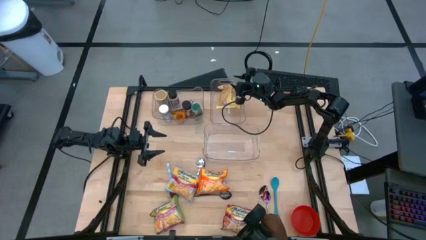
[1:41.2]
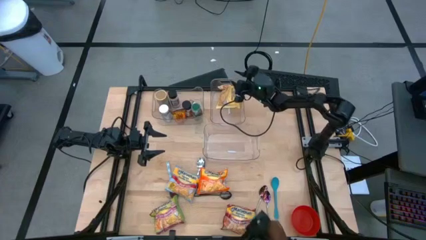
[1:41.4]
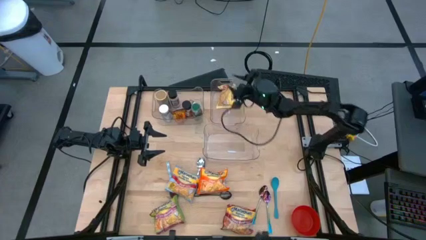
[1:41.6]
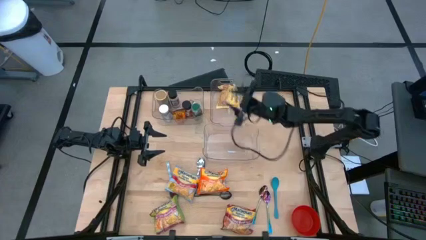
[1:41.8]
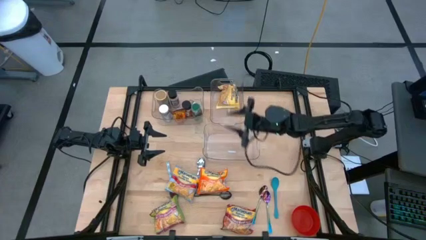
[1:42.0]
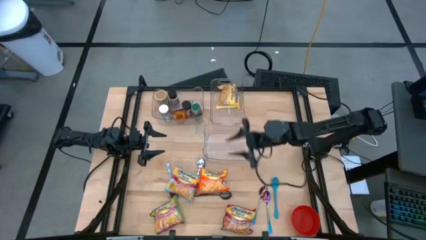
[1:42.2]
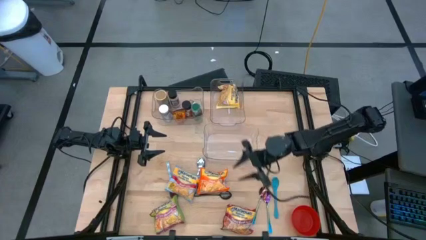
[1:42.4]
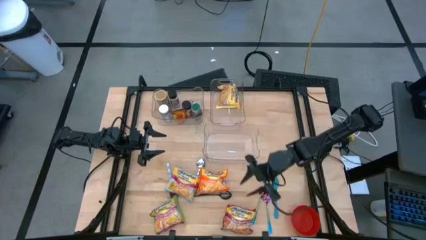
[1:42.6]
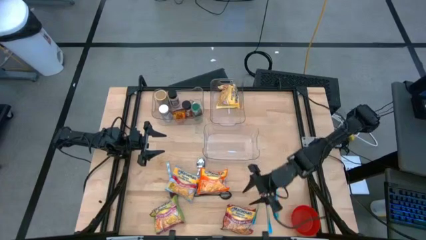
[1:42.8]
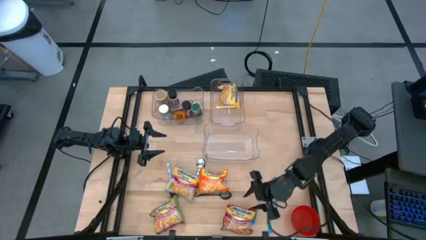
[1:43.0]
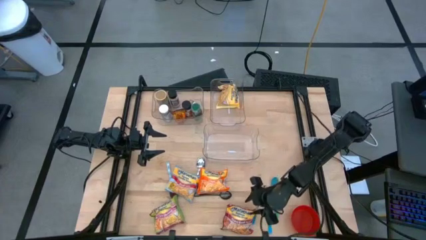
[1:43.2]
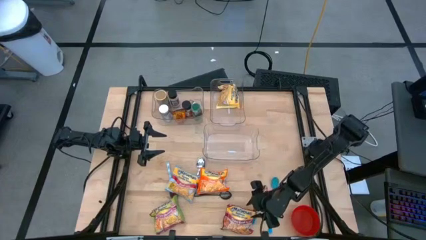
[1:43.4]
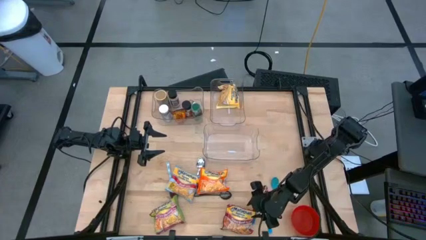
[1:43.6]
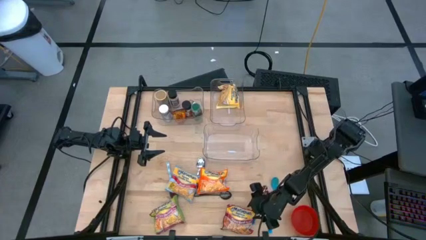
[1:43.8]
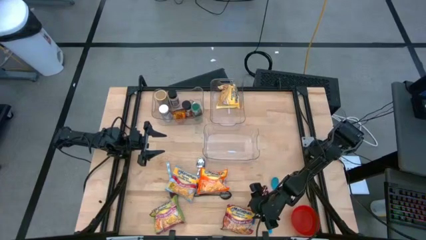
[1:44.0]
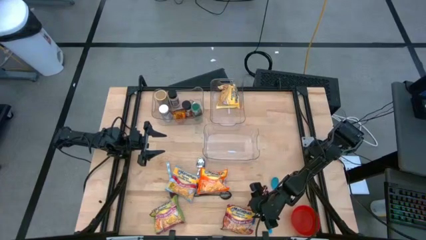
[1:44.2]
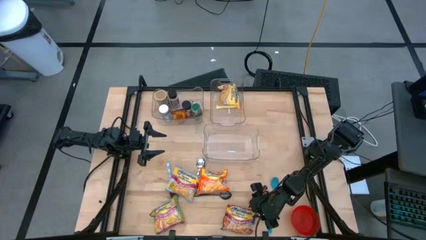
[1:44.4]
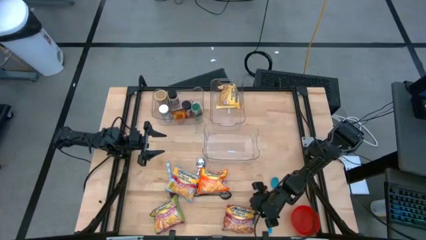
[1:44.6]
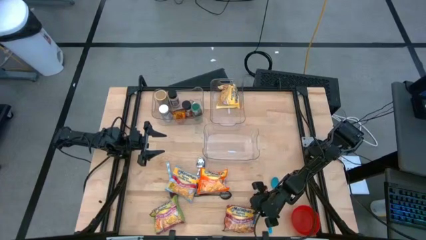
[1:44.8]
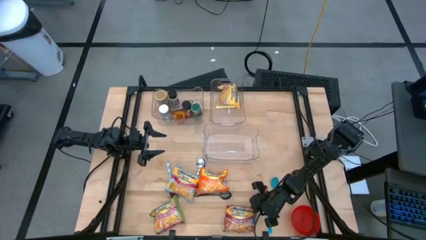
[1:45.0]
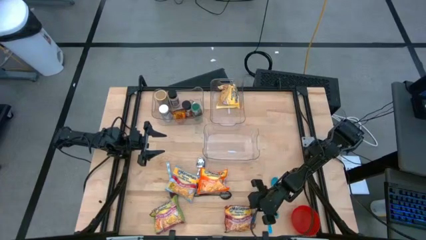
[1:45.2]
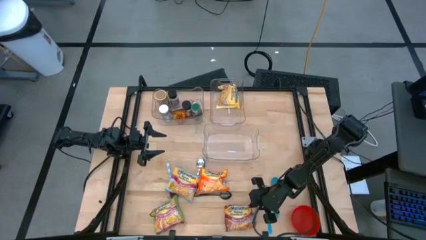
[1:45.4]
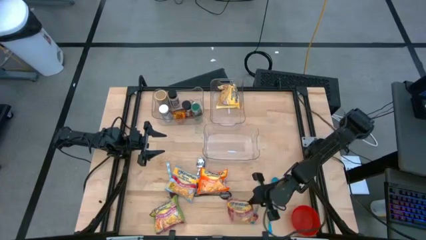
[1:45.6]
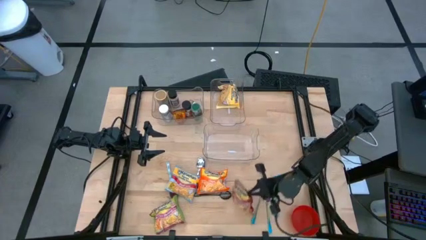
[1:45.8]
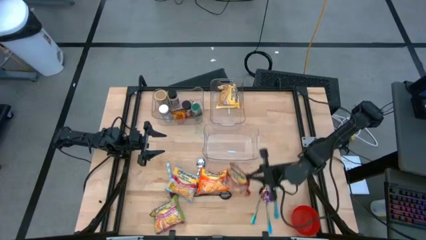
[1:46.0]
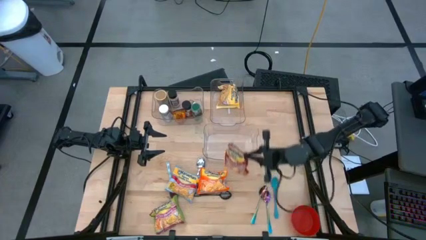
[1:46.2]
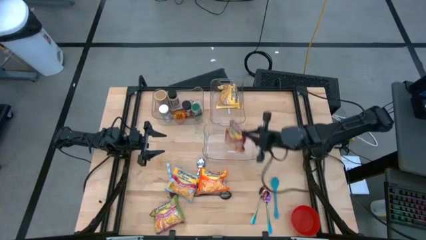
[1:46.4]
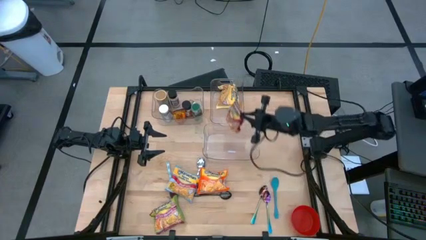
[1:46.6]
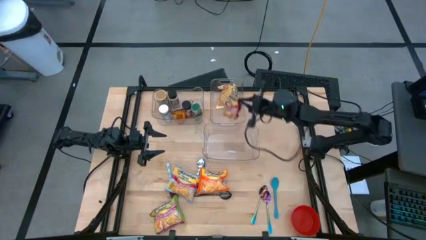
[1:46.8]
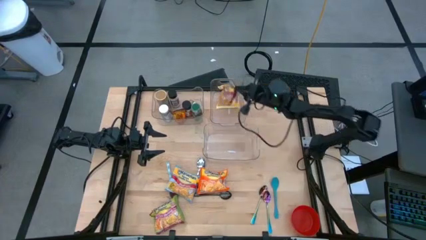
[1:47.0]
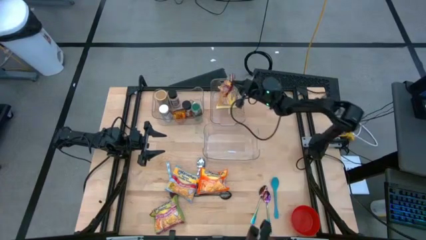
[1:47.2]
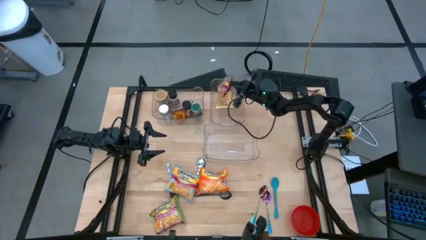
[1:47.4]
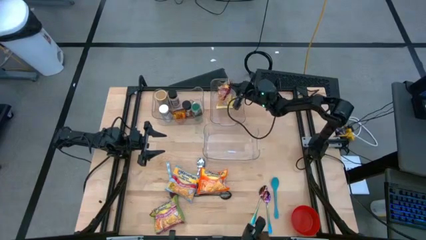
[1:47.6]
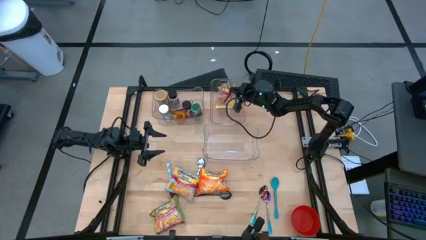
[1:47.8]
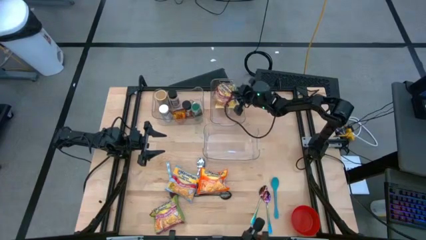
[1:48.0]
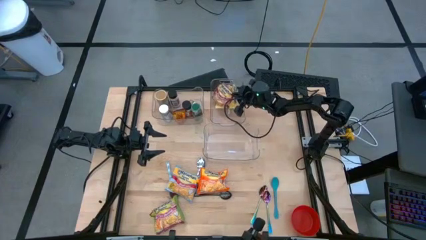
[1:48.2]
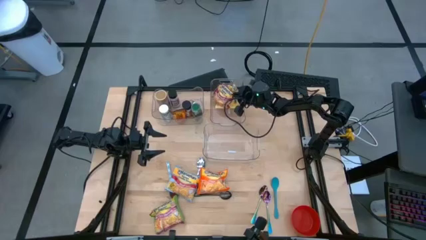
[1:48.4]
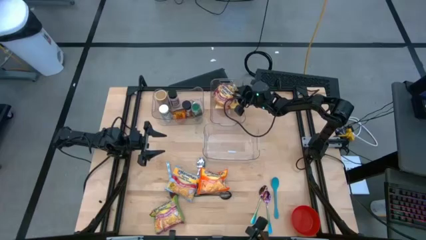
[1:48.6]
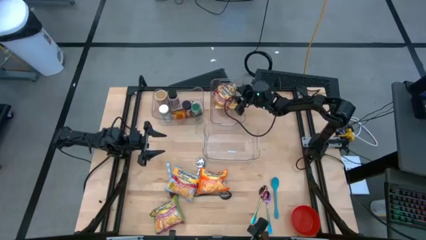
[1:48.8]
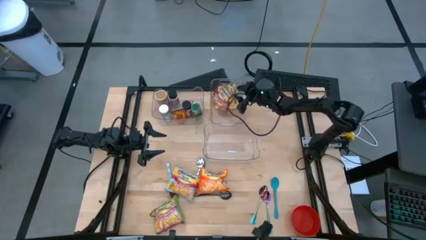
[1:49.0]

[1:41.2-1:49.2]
Task: Pick & Place Food Item
Put the red noodle pack into the top right transparent container

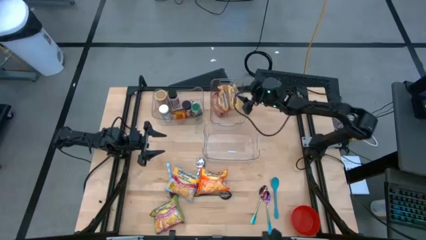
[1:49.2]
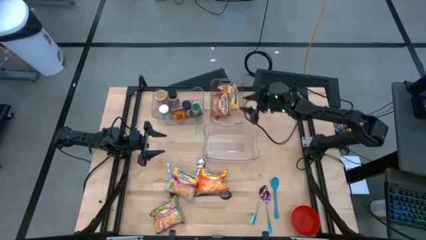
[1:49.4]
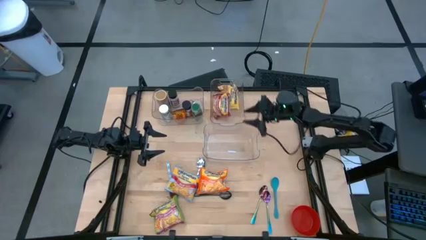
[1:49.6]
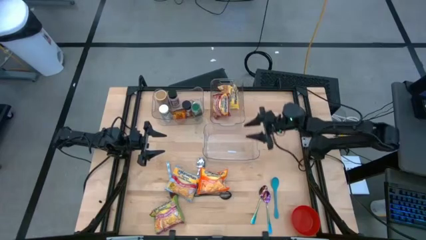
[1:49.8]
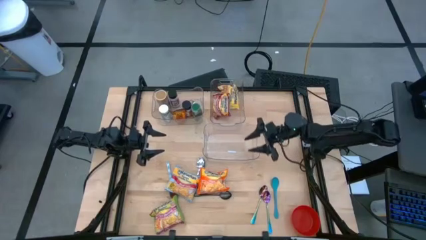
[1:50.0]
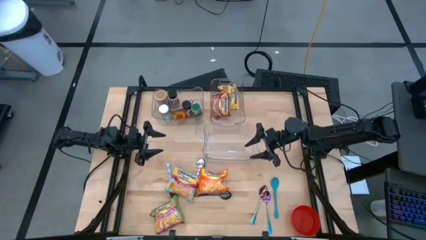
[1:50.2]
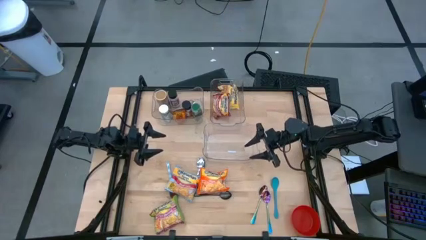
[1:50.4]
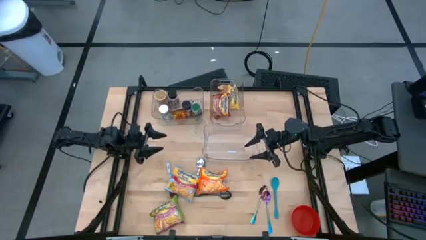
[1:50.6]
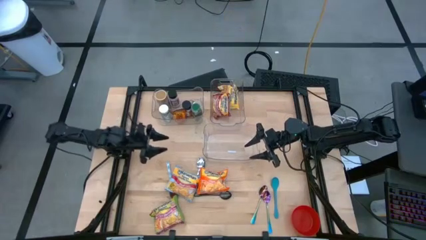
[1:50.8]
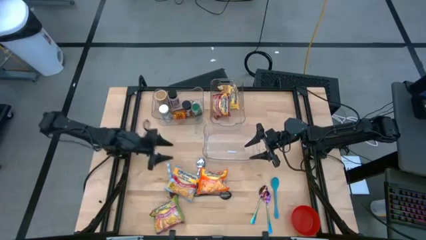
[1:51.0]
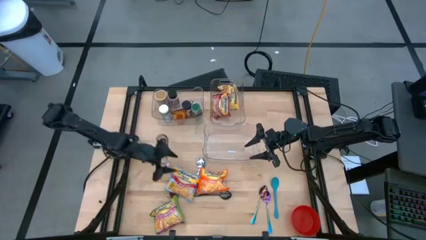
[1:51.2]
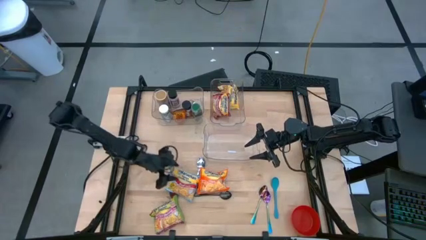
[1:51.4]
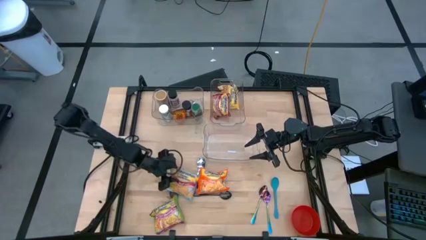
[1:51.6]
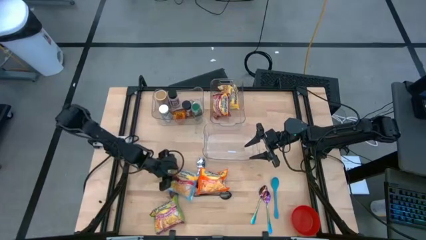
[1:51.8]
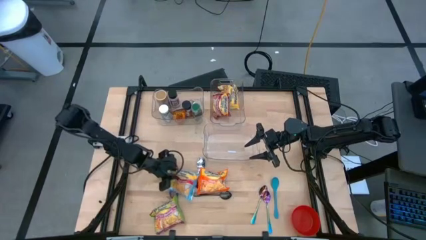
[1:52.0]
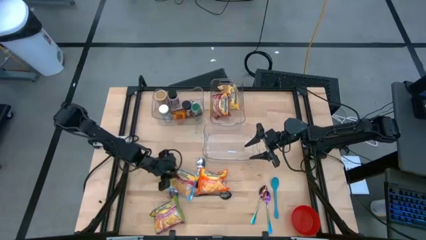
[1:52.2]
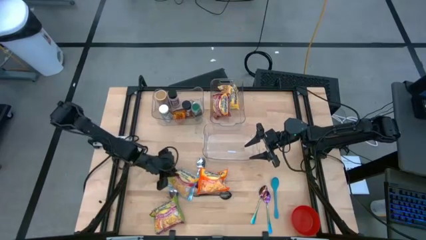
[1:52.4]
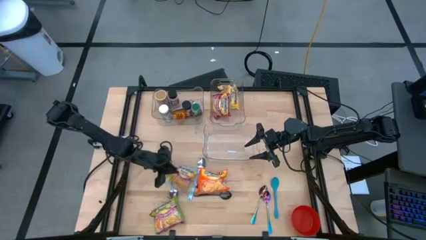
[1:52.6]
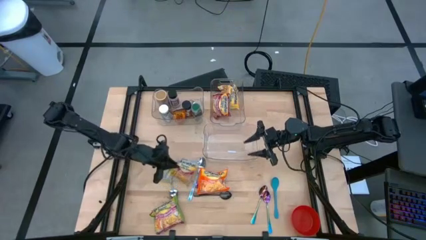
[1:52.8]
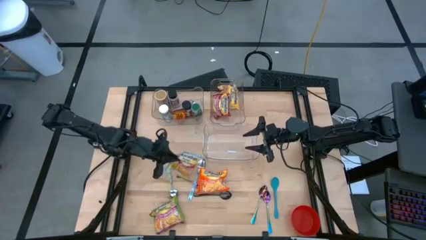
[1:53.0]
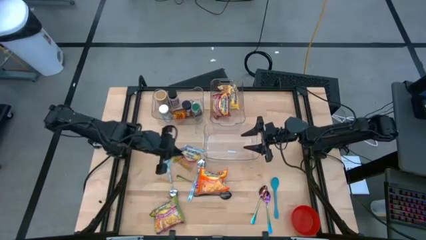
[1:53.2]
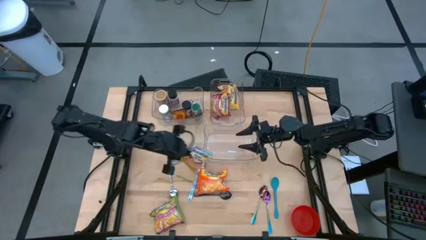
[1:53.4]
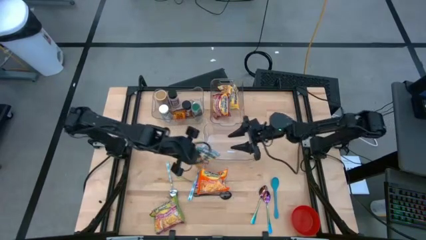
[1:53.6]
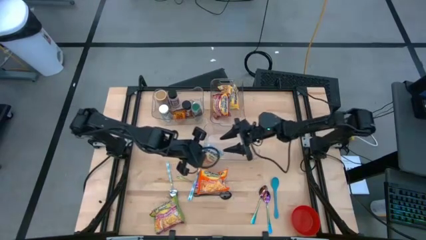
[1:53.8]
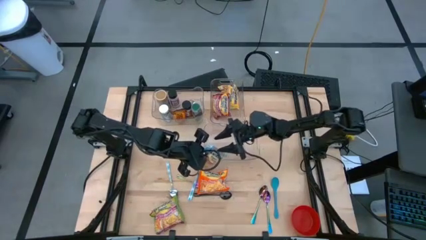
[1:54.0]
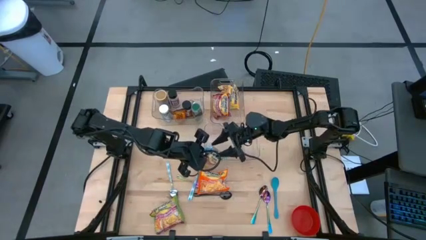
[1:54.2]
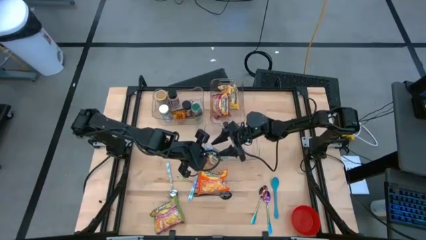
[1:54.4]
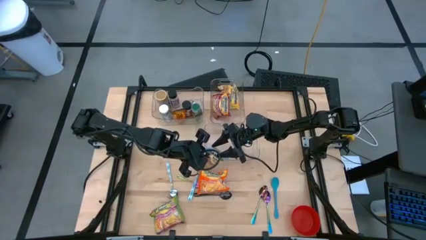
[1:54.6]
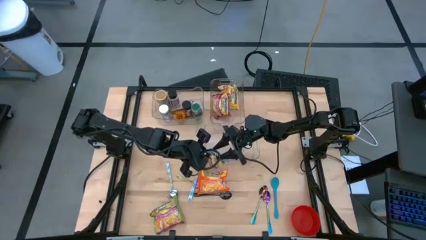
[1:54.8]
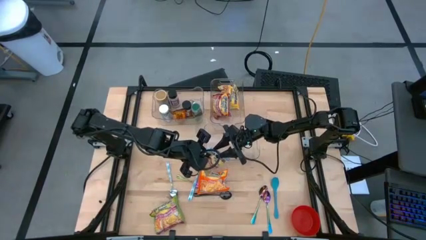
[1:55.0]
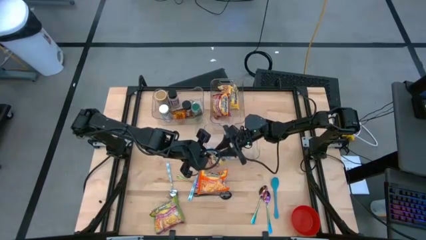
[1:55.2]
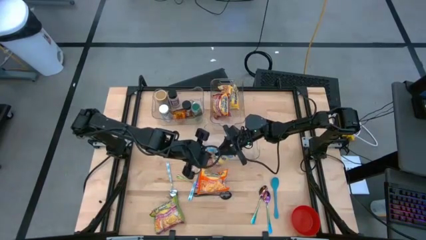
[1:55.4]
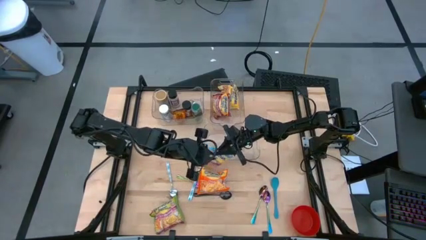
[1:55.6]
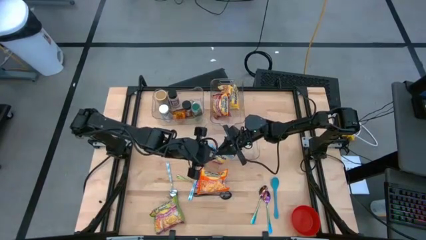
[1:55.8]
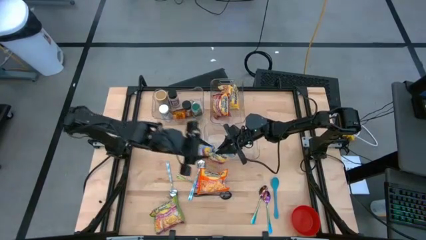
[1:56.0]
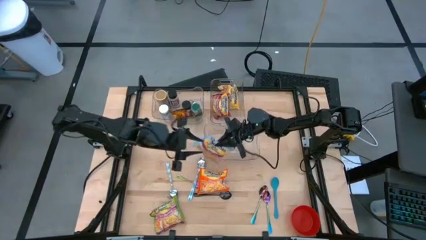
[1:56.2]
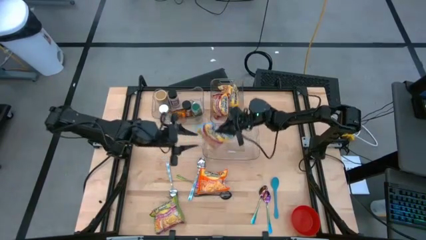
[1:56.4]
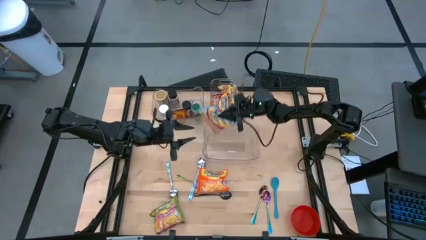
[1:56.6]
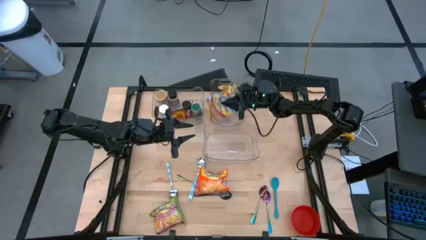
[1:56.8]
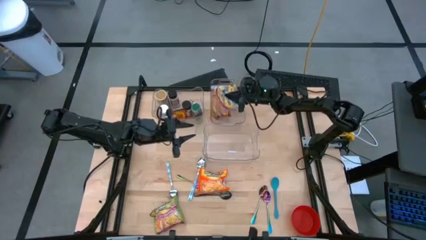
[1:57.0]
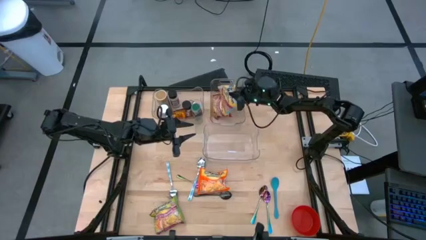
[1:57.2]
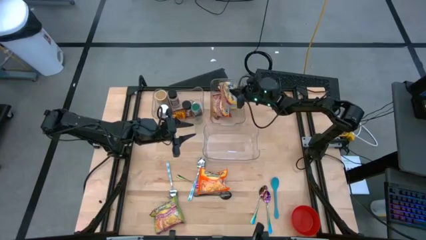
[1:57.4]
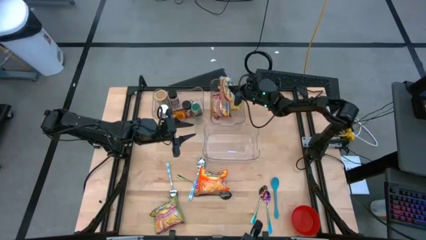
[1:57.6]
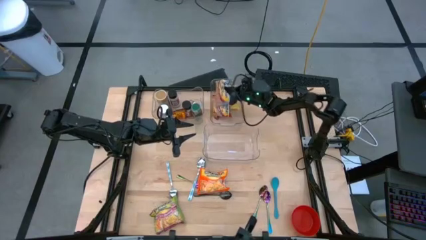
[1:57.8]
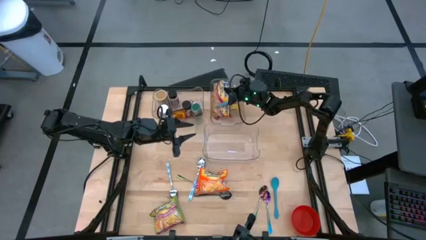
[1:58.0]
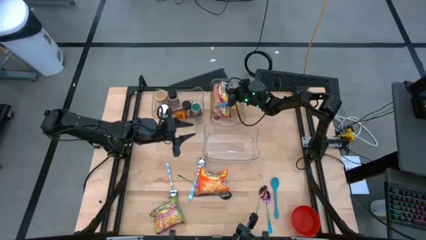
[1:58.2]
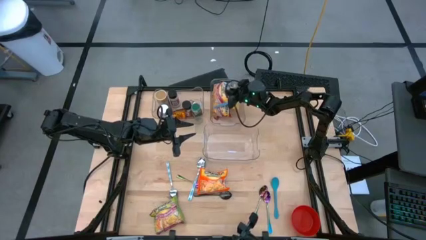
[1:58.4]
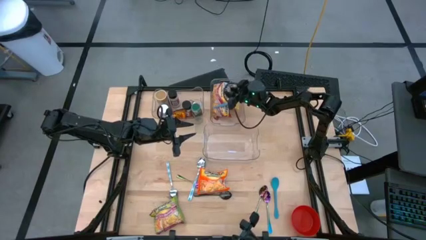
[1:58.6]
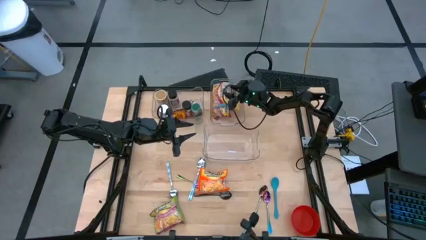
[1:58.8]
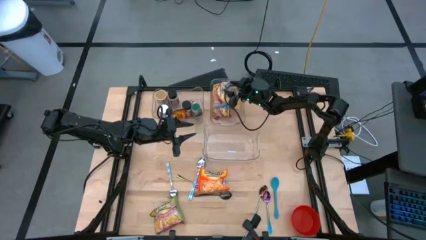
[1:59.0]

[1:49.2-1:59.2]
Put the blue noodle pack into the top right transparent container
